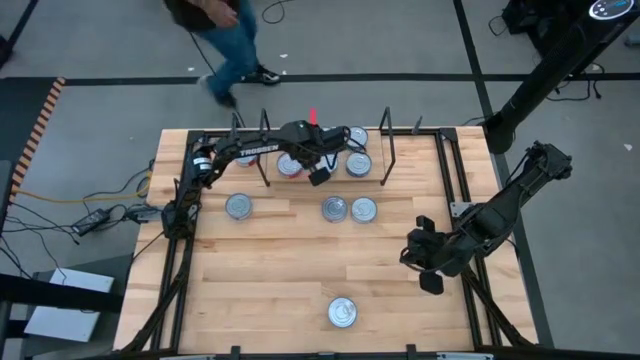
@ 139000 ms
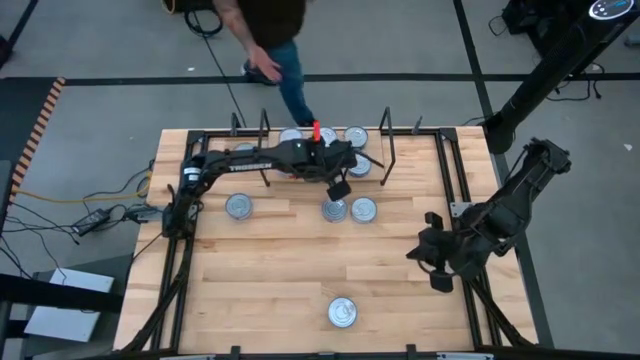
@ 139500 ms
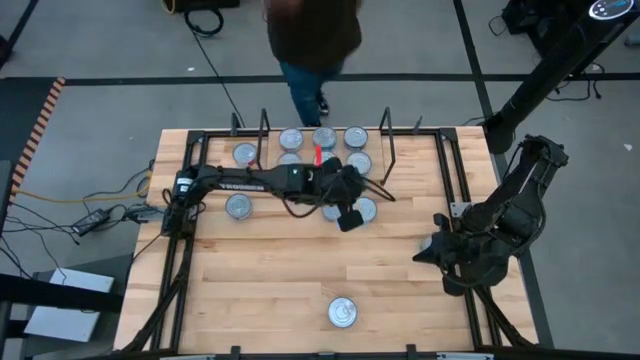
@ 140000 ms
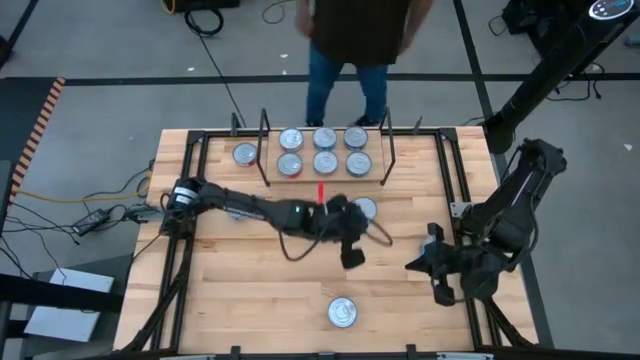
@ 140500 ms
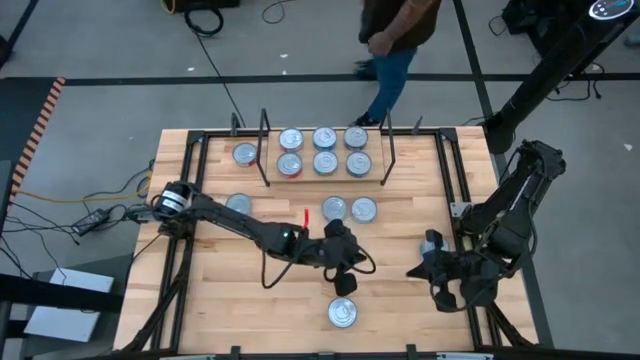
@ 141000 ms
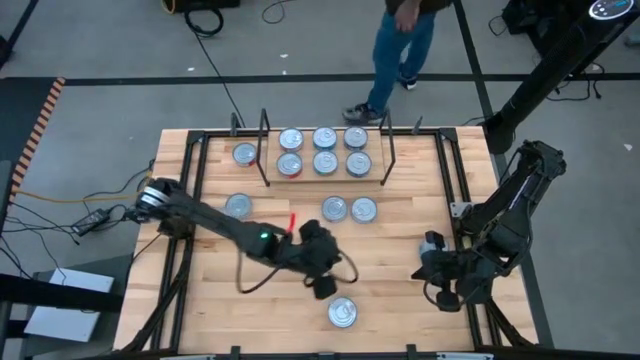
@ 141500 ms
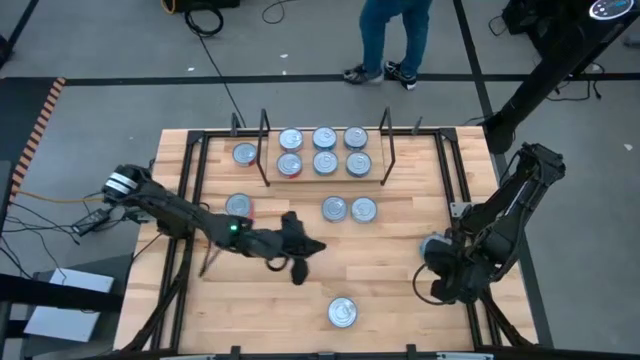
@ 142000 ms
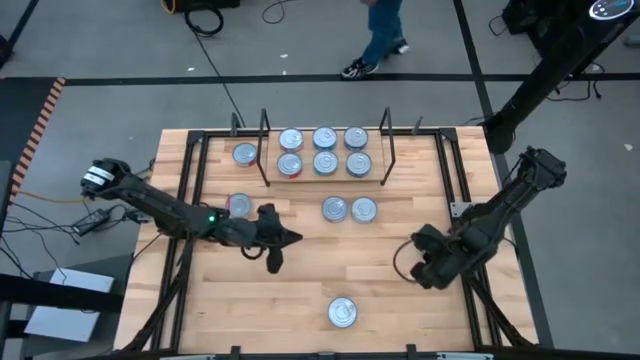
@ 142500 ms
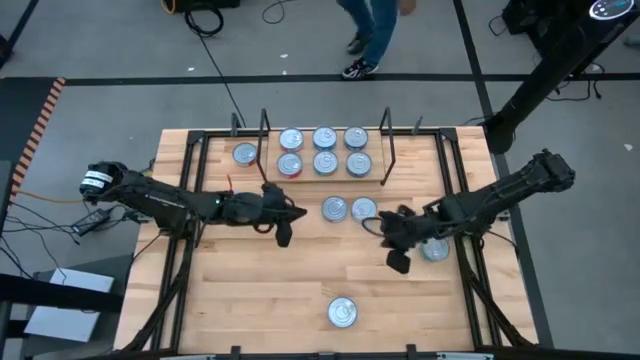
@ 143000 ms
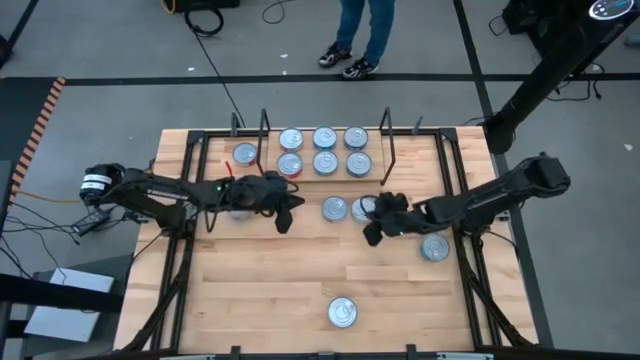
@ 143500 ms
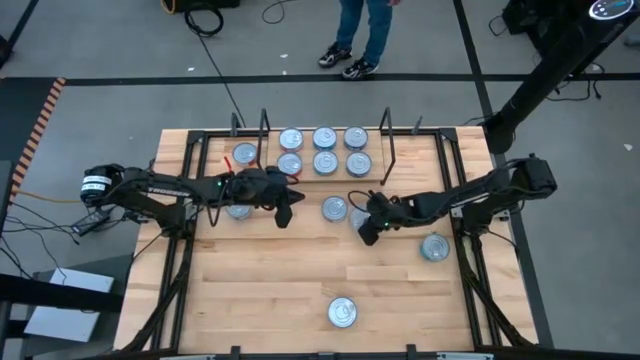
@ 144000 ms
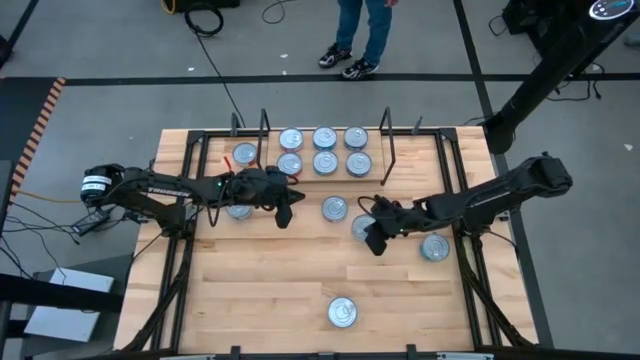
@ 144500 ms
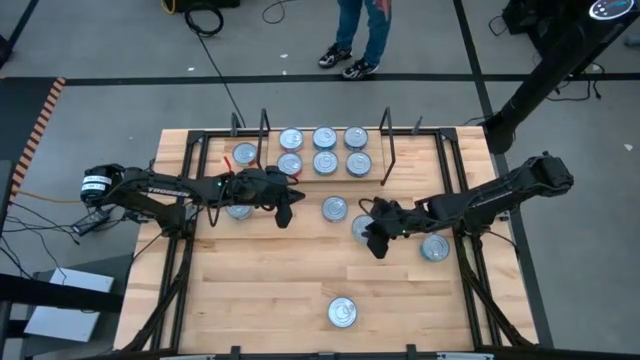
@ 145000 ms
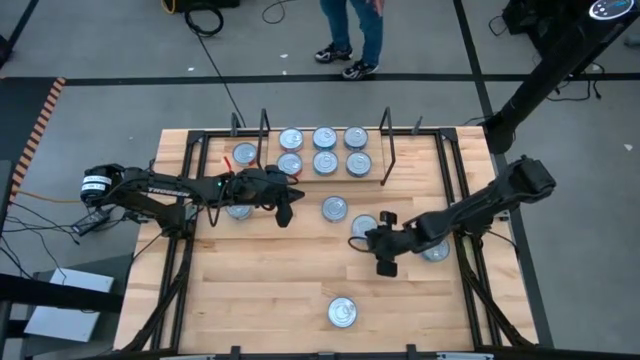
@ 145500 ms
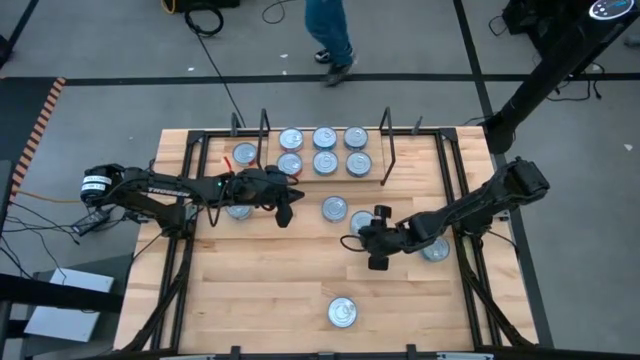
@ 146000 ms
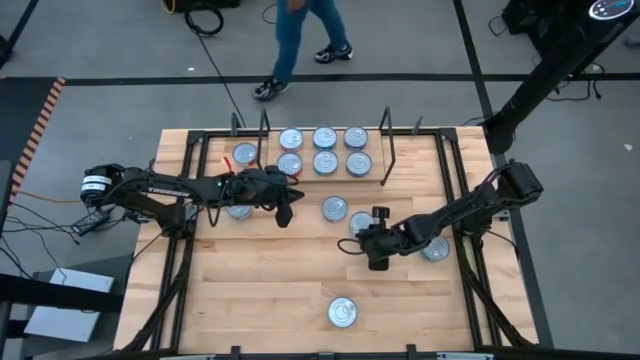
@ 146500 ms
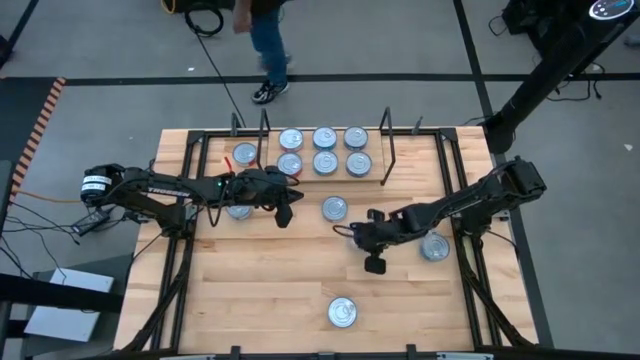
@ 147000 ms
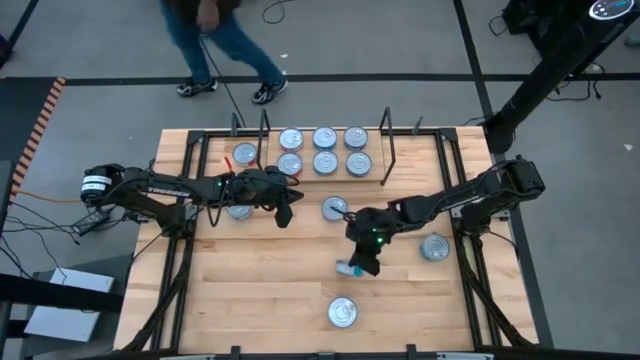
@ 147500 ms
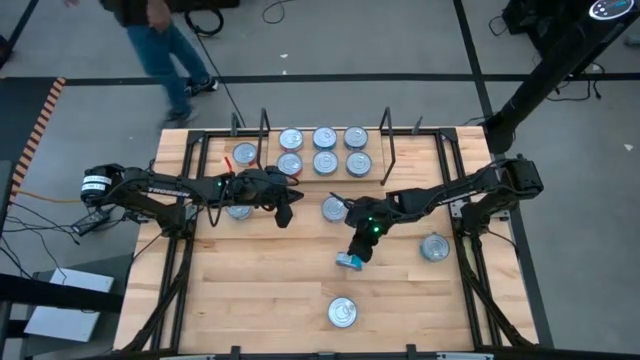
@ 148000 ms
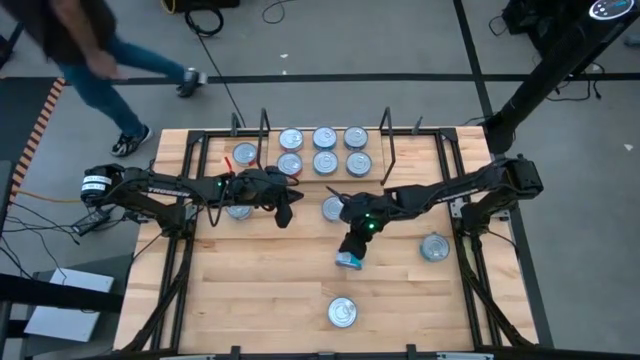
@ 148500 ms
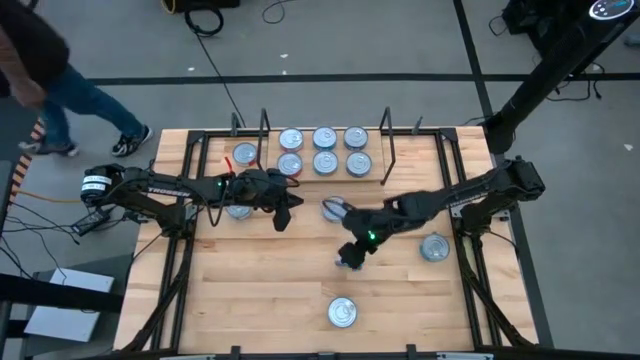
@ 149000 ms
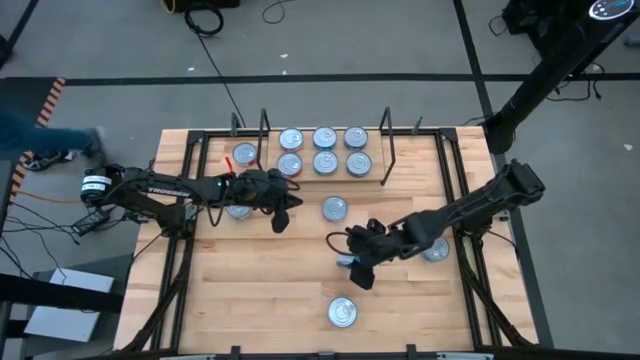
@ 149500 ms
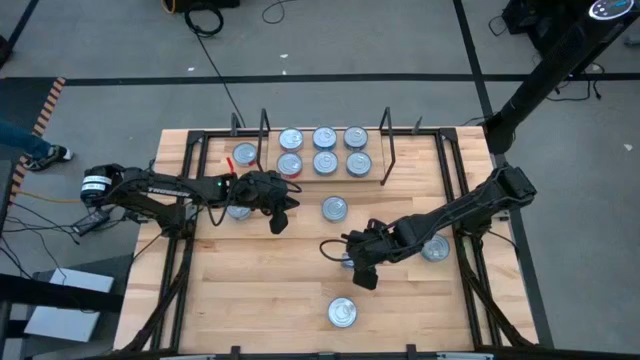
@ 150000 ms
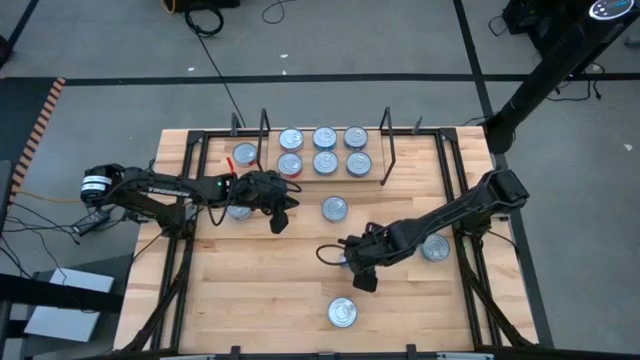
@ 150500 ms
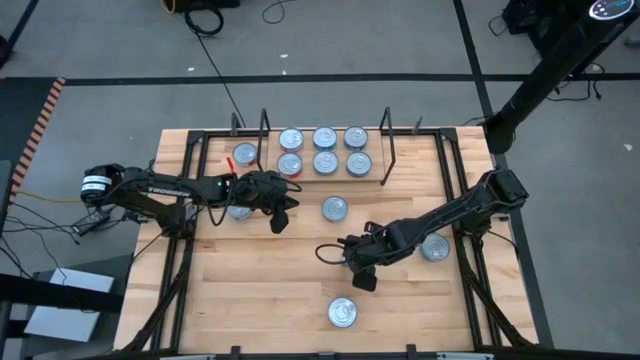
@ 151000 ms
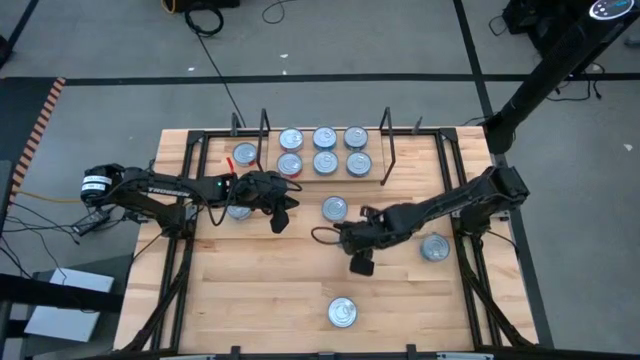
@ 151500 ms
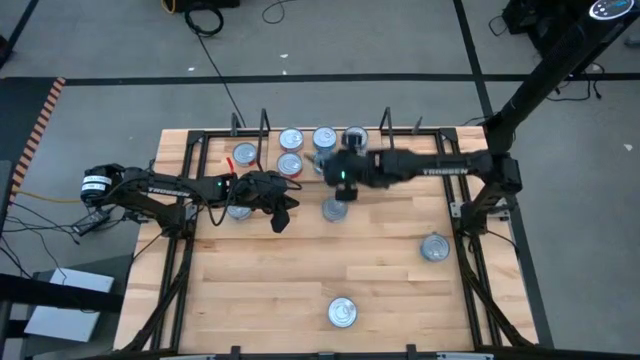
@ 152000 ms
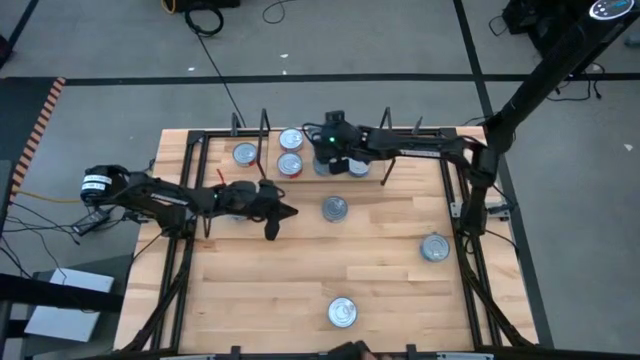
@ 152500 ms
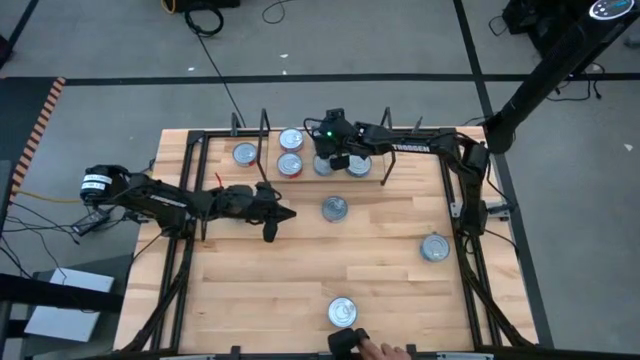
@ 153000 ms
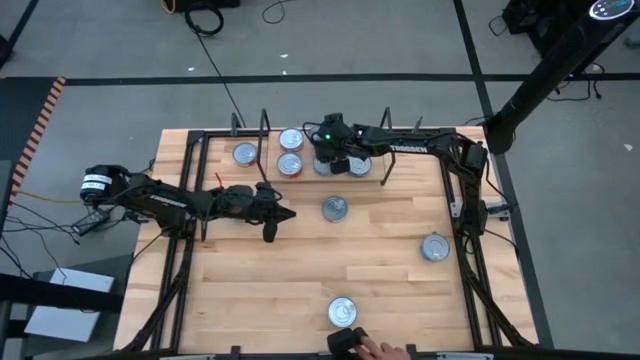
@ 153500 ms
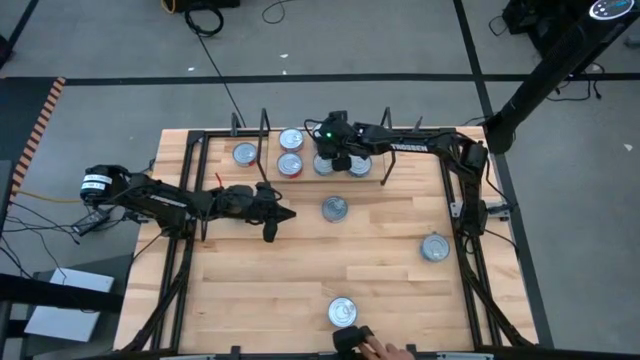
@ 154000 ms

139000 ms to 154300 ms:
Task: Stack canned seafood by type on shelf
Stack the light blue tuna can on top of the other light blue tuna can on the shelf

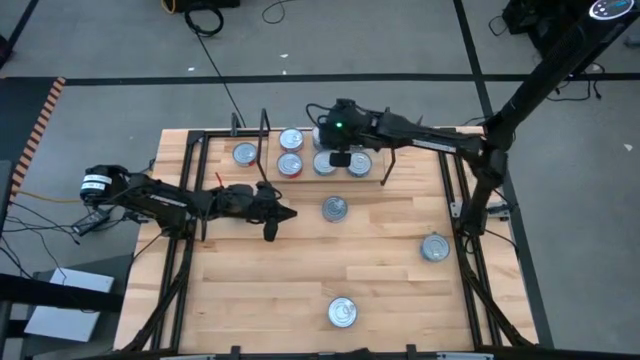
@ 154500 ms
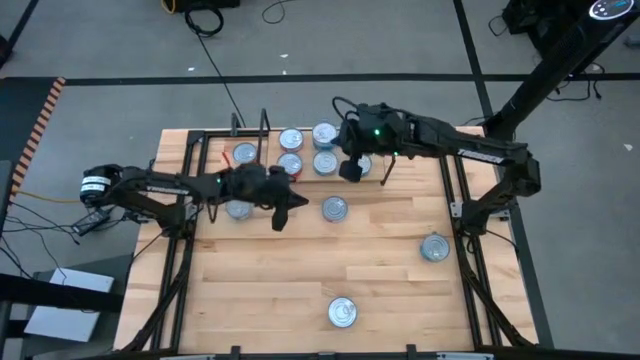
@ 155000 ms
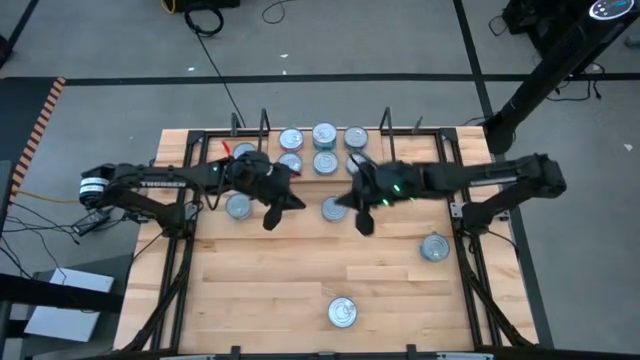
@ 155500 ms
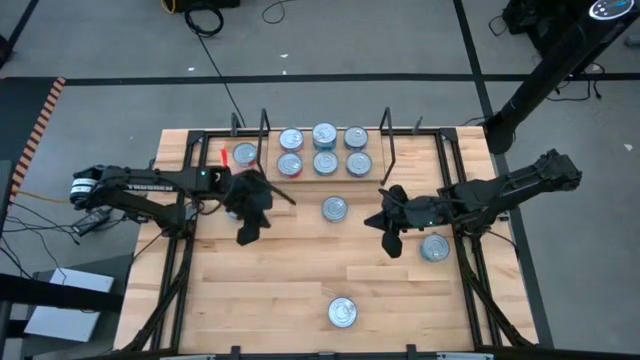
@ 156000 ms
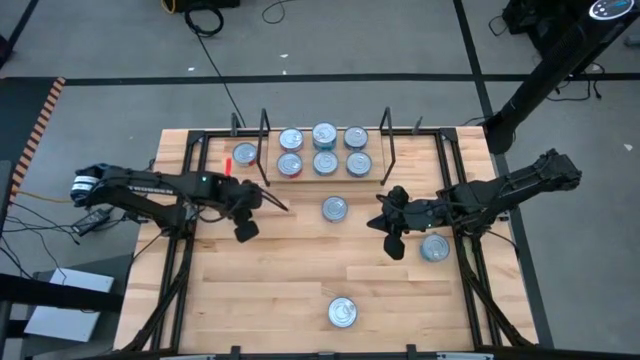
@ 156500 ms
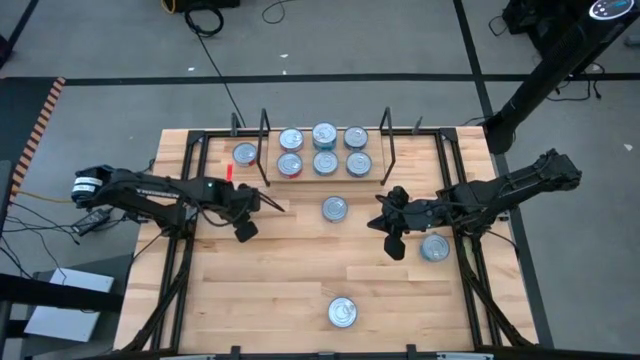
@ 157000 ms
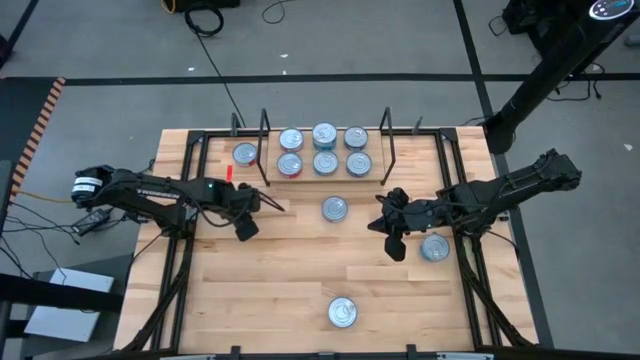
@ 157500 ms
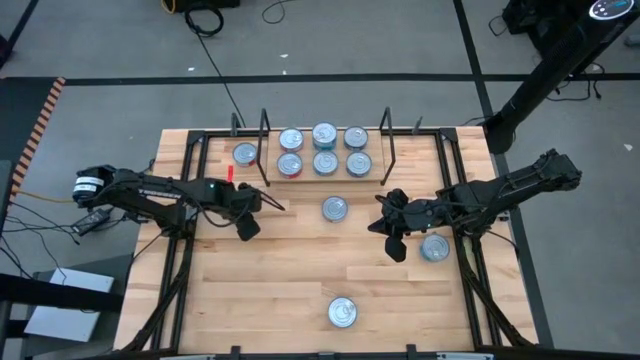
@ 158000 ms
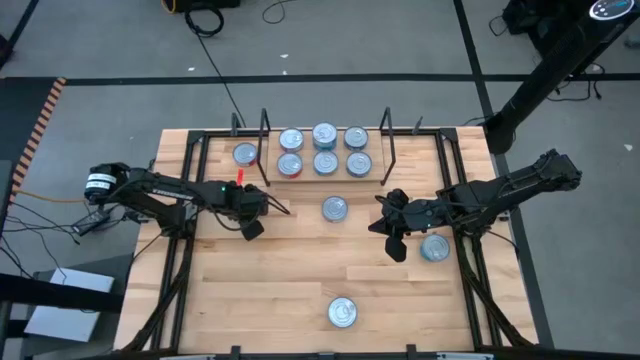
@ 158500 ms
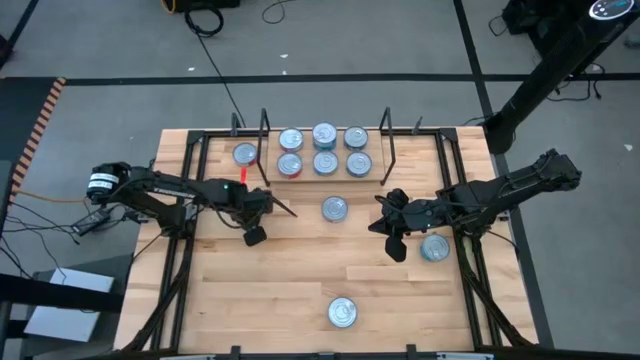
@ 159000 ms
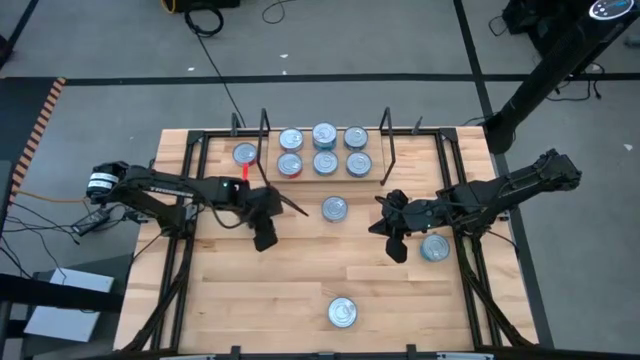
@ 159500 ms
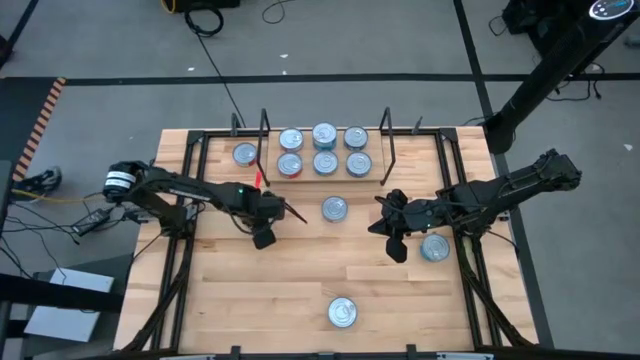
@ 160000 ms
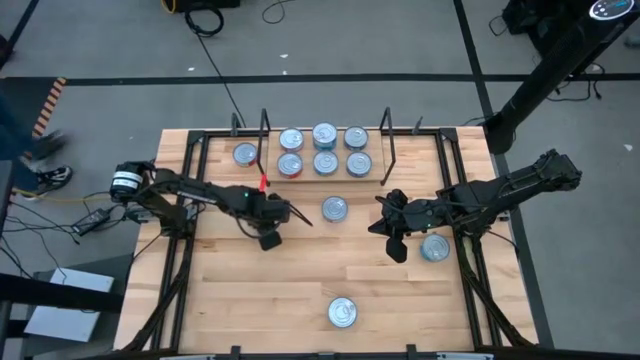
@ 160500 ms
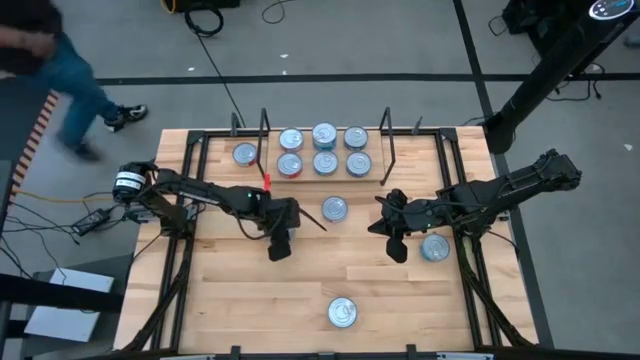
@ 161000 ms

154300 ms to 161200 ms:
Stack the blue tuna can on top of the other blue tuna can on the shelf
